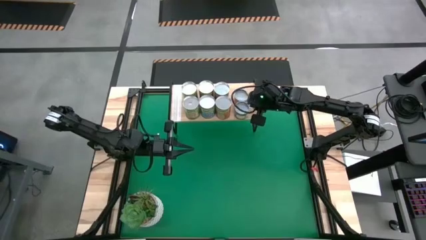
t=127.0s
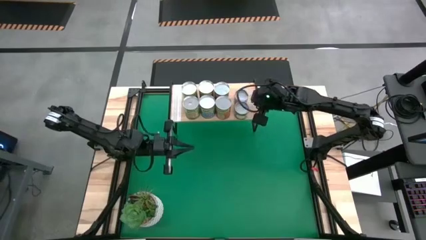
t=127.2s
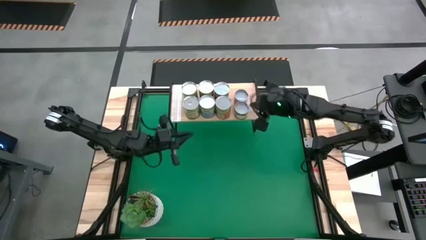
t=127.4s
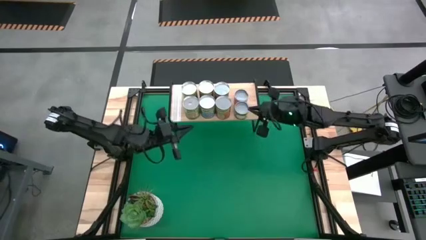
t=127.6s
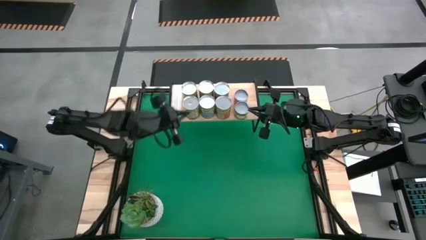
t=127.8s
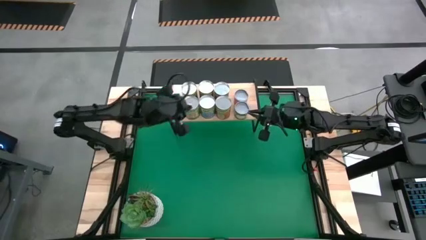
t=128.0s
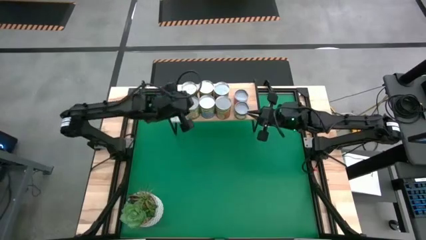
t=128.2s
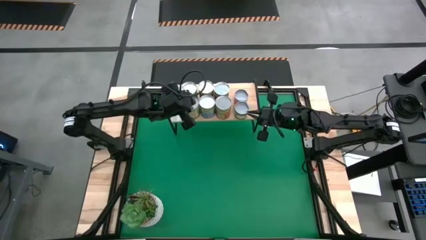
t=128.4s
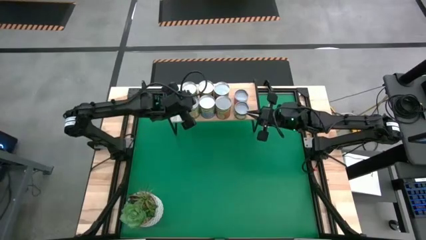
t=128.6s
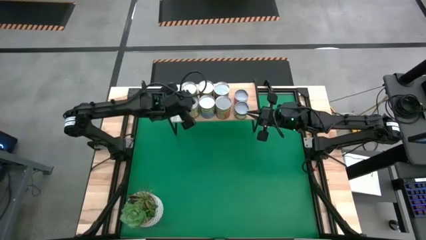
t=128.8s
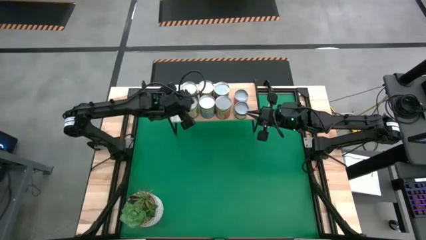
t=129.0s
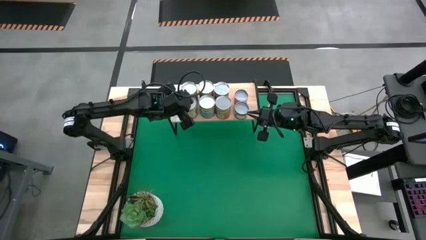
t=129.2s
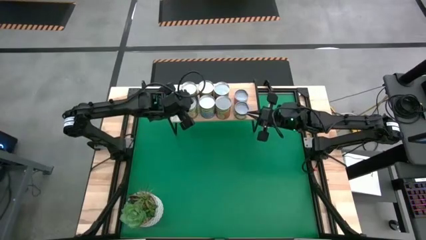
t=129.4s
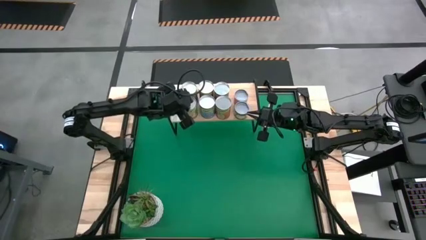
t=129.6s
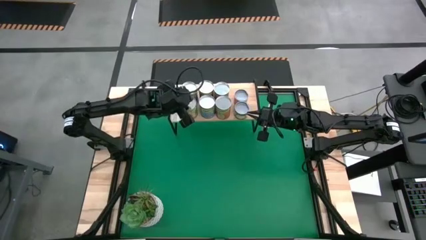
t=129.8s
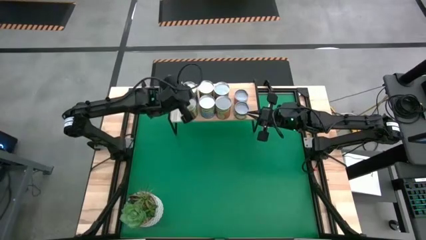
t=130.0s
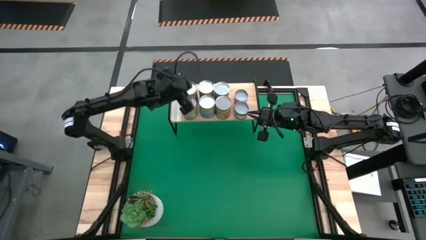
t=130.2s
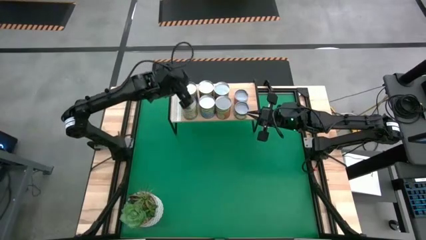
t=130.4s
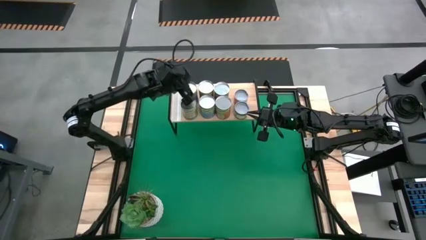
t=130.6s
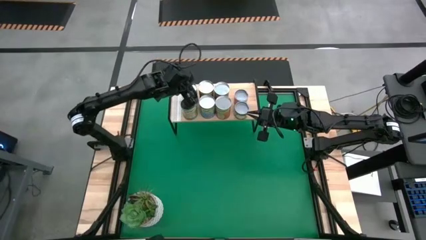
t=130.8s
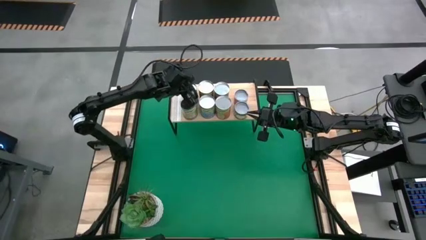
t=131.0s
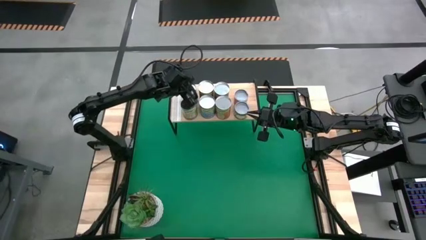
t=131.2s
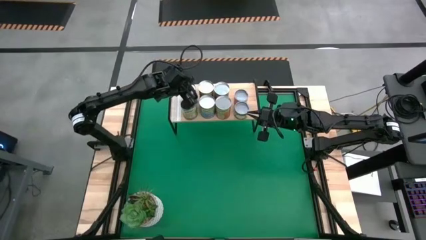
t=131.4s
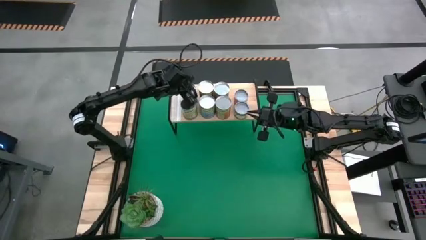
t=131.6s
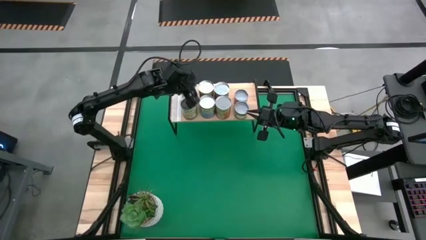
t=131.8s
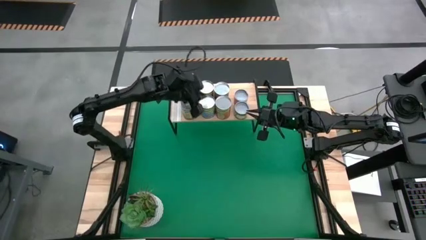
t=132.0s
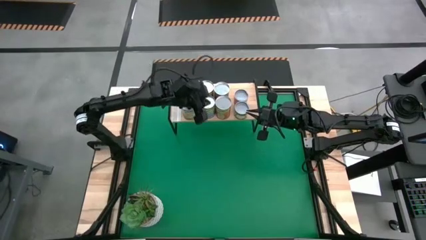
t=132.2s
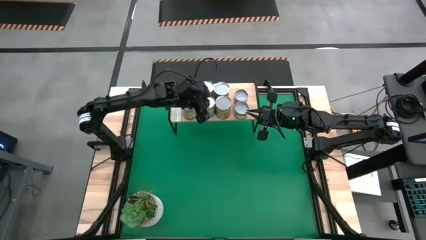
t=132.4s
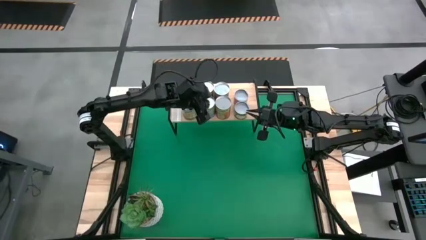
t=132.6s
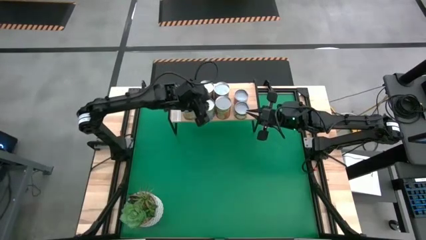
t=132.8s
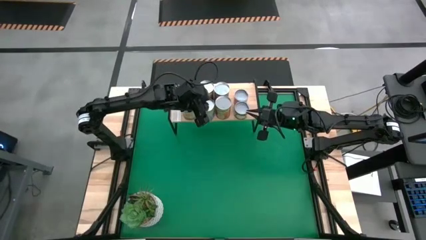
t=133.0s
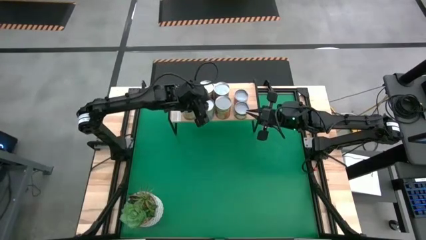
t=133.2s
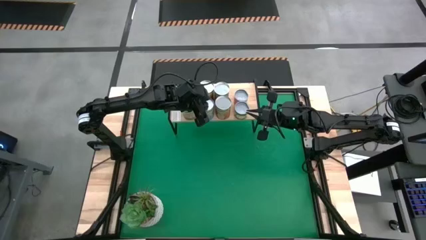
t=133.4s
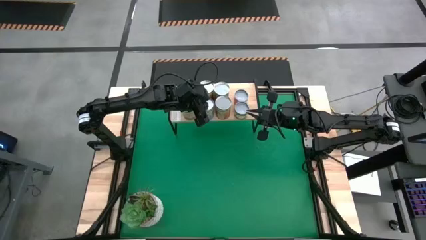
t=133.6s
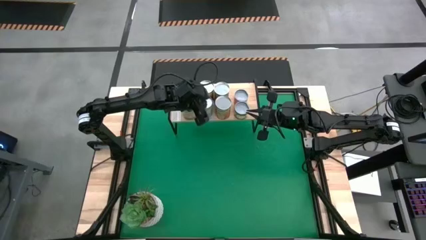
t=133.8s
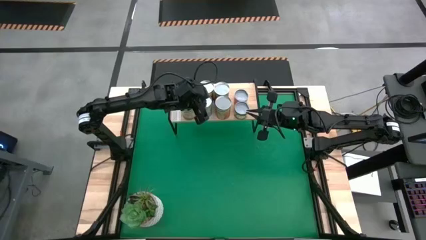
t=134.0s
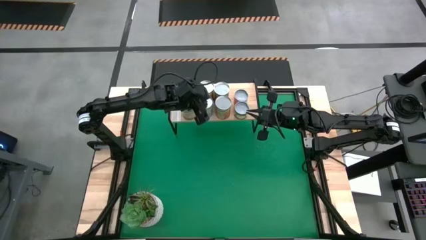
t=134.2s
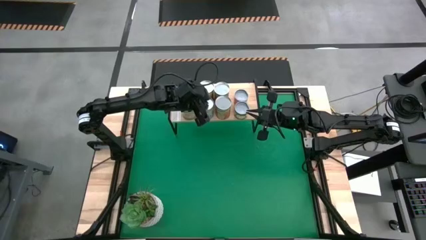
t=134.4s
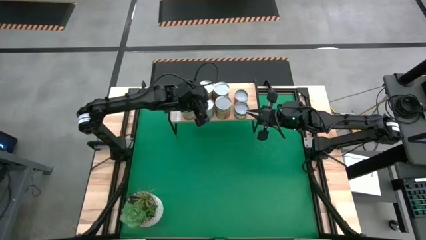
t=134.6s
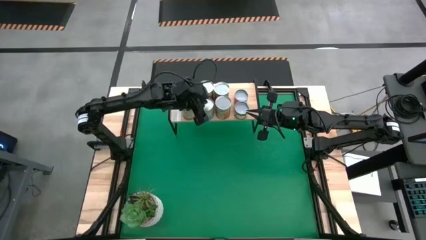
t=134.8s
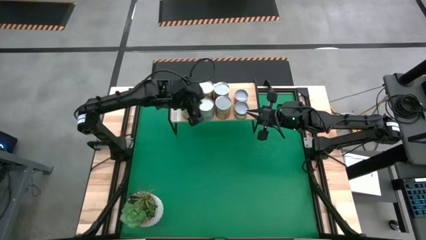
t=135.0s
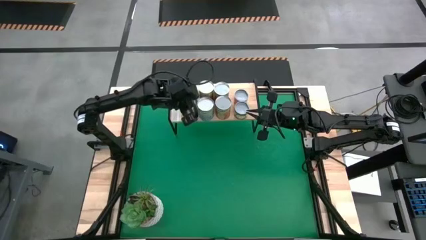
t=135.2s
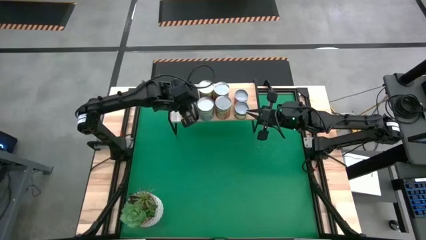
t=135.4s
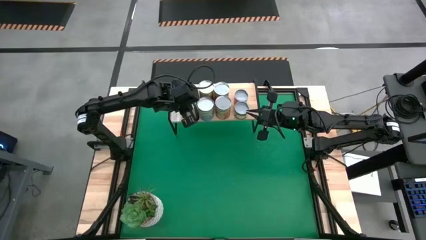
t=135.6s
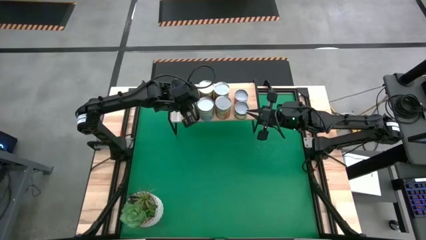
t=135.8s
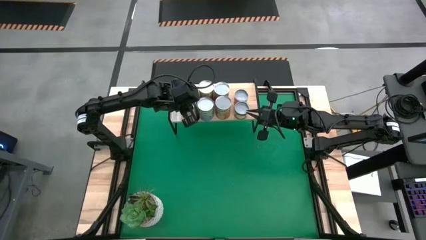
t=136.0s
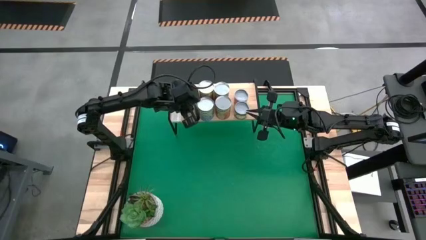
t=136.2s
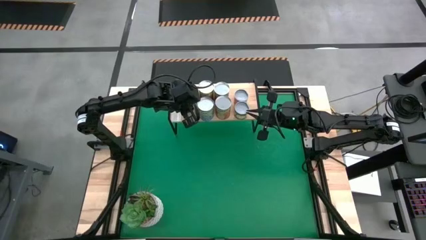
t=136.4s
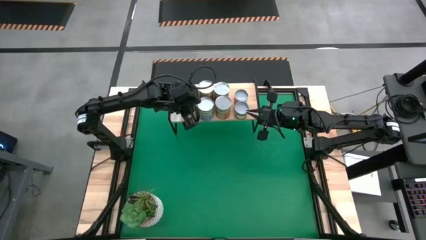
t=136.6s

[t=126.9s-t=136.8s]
Task: Pick and place cans onto a shelf
Adjust the canned goods on the shelf

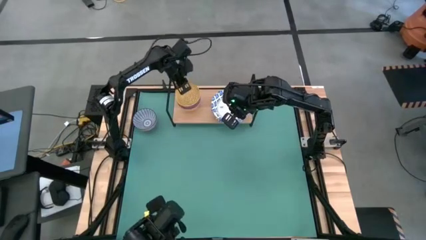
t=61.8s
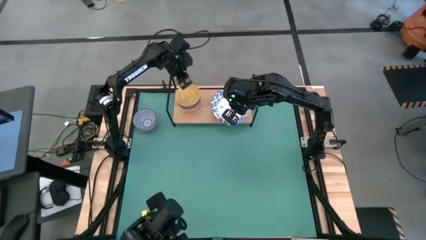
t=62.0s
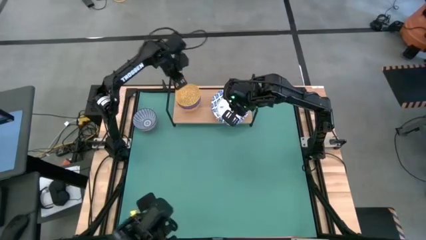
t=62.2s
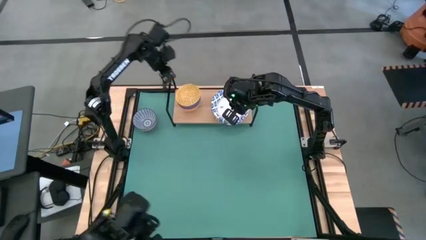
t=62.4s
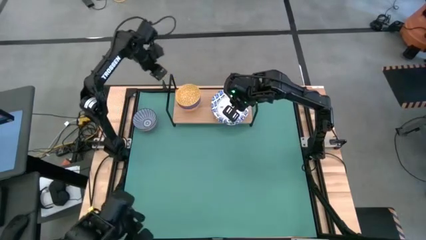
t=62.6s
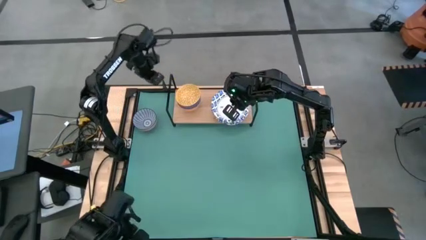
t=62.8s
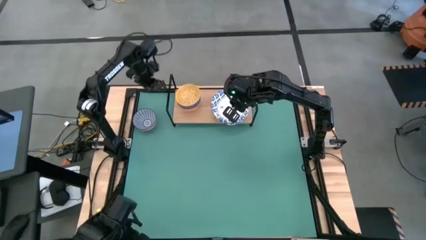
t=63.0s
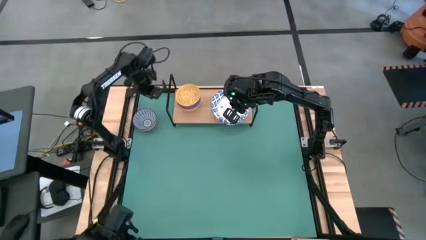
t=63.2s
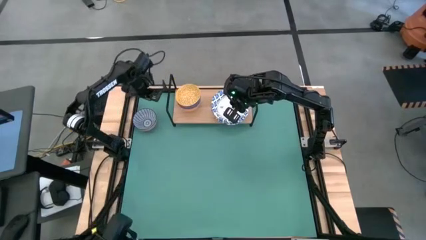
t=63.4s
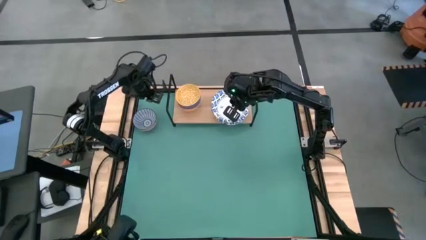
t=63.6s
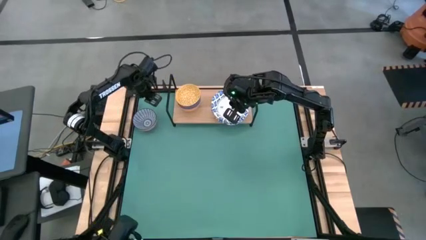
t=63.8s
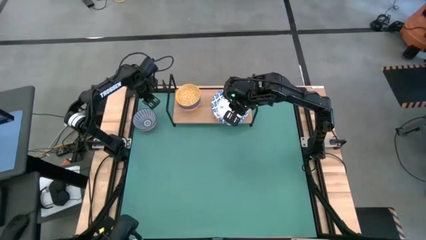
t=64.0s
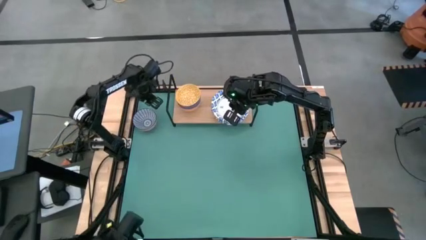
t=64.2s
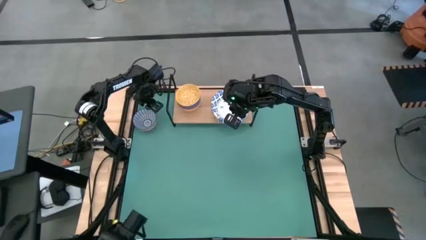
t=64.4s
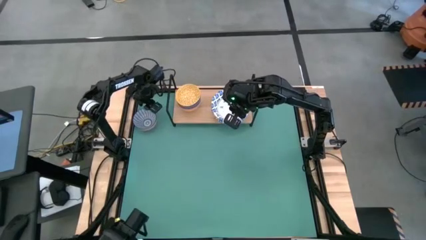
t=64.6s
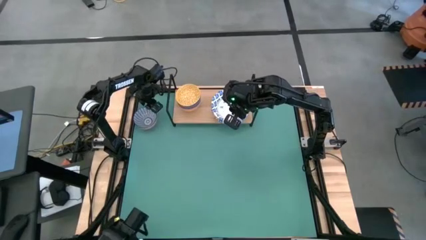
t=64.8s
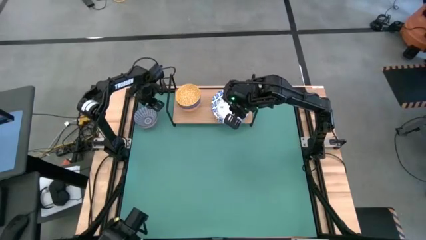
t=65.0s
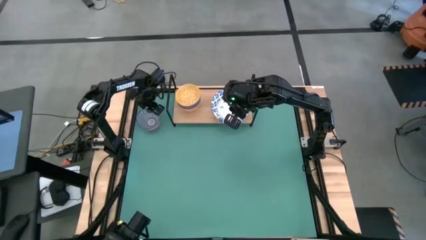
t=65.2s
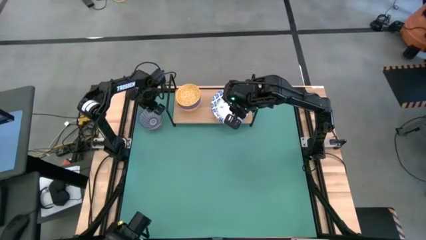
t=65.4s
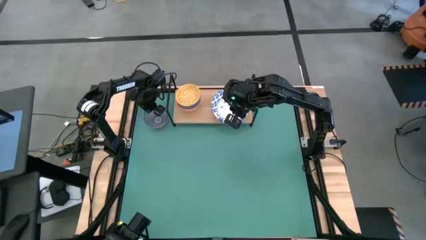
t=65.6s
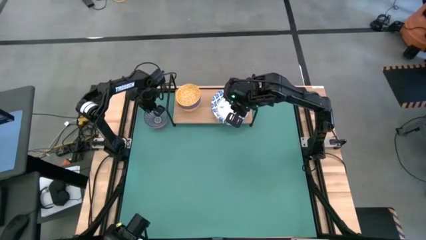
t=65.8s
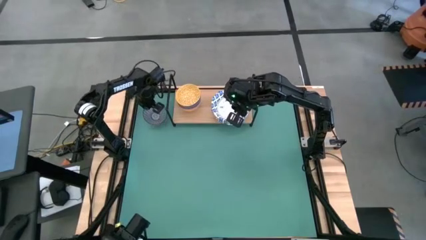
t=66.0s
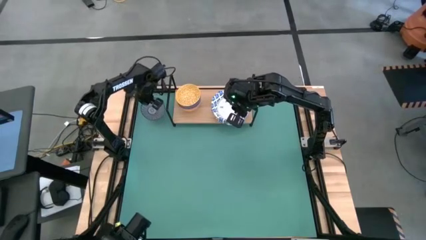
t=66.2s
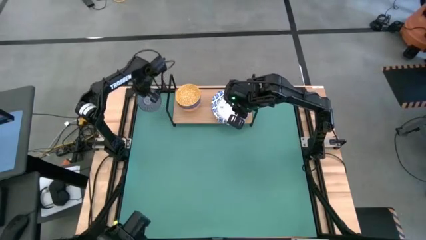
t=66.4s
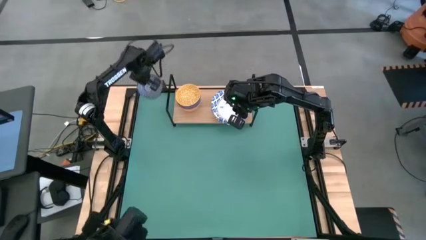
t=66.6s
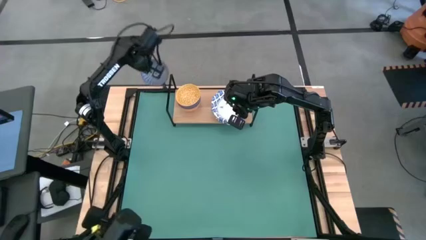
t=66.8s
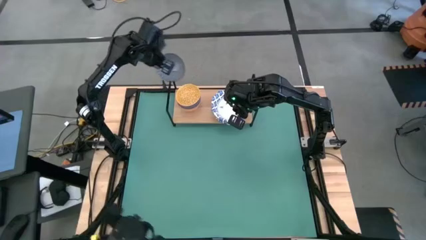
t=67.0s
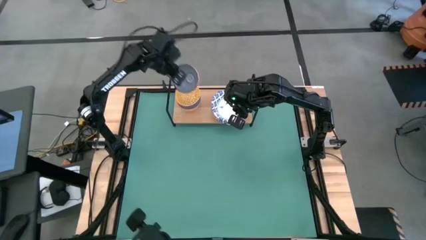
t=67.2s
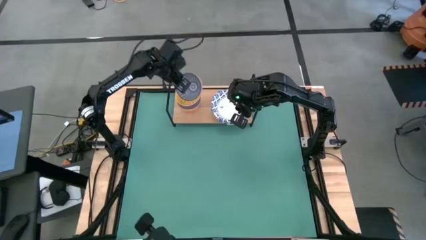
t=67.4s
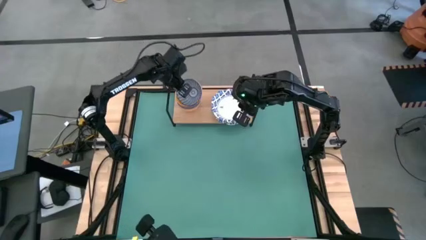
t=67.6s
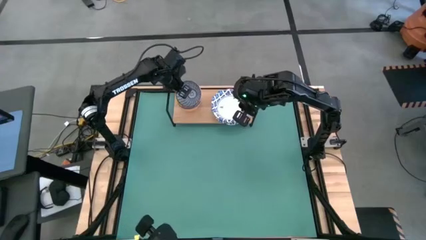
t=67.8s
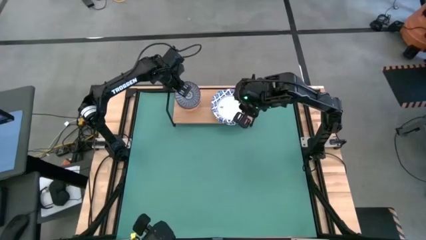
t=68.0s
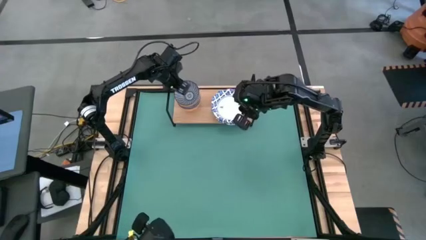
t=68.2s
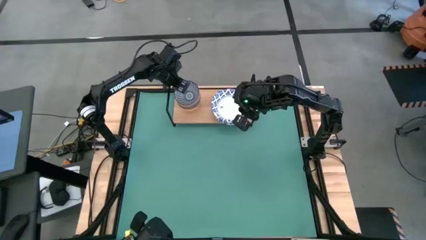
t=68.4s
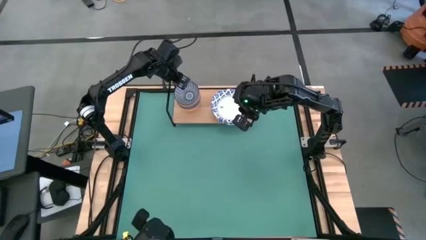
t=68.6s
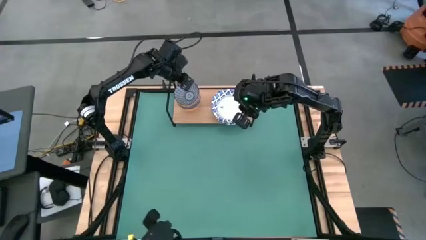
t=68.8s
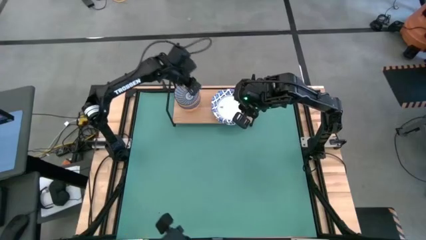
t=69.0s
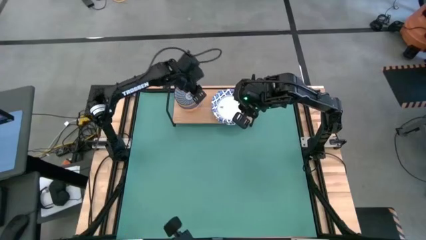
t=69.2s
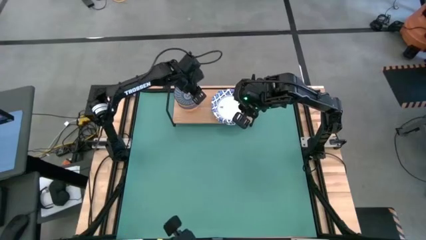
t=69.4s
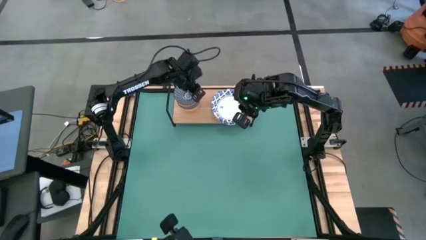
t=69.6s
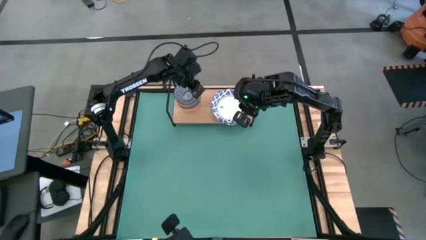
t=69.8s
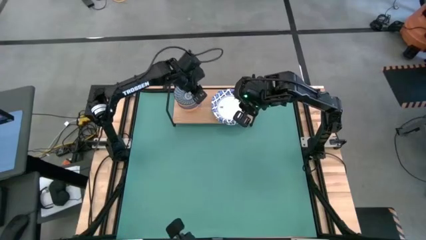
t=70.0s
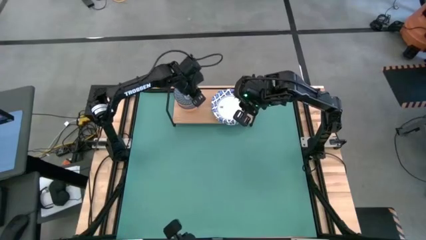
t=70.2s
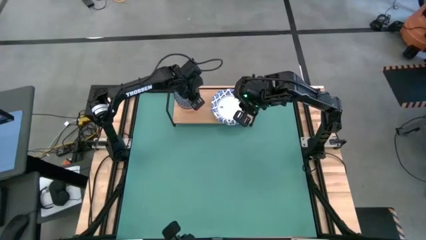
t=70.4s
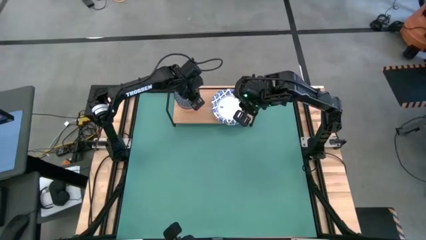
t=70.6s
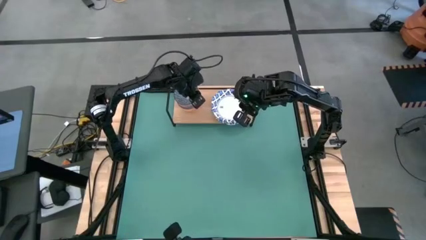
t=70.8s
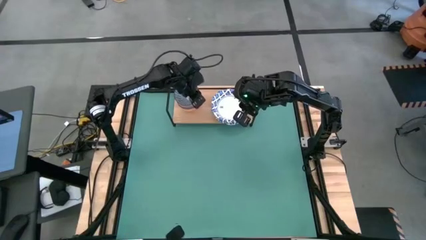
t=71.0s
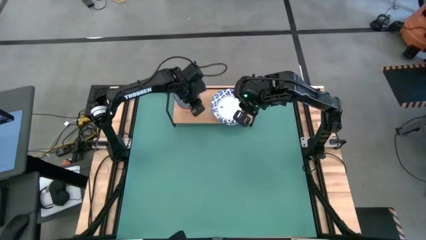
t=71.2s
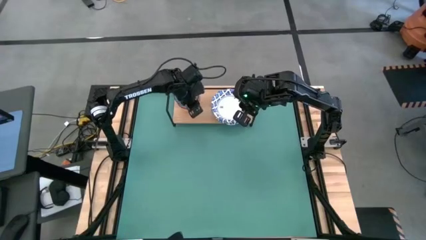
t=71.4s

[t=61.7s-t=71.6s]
Task: Place and stack bowls onto a shelf
Stack the blue striped bowl on top of the yellow bowl on the shelf
